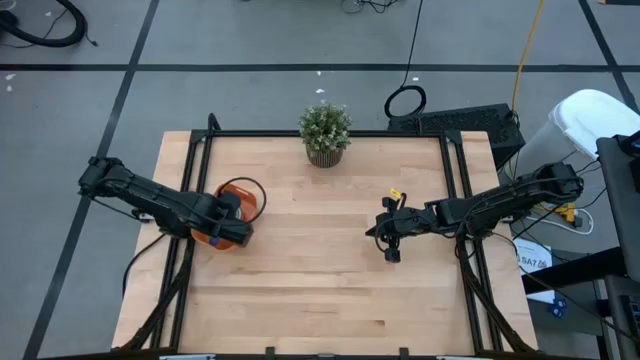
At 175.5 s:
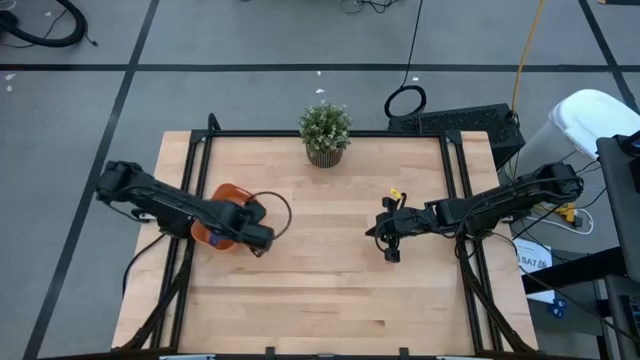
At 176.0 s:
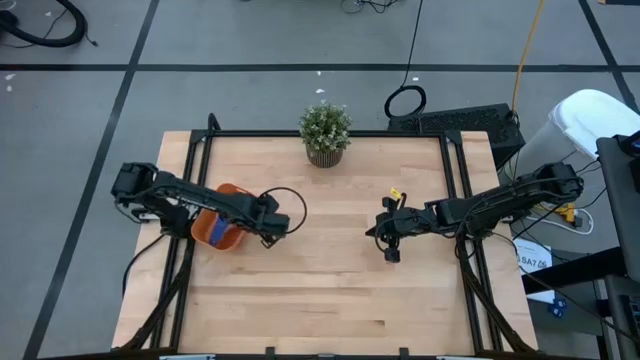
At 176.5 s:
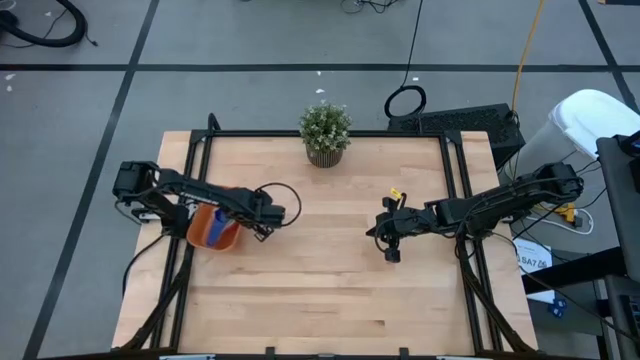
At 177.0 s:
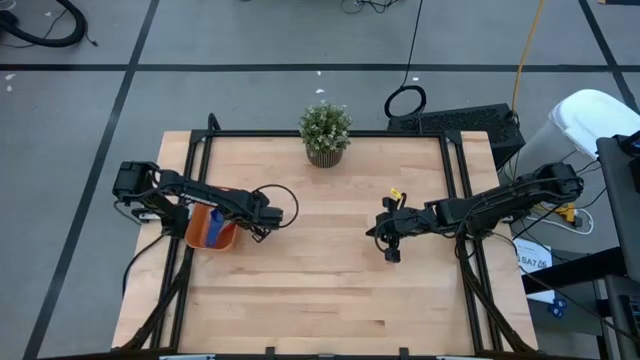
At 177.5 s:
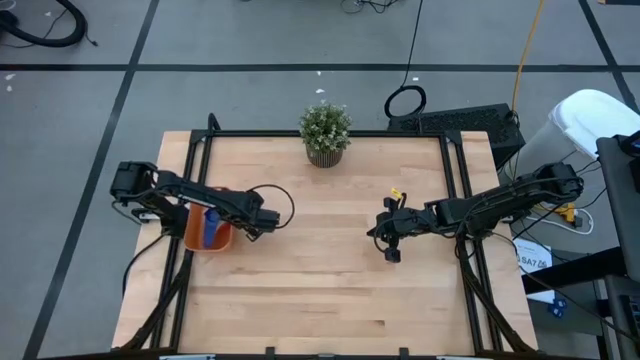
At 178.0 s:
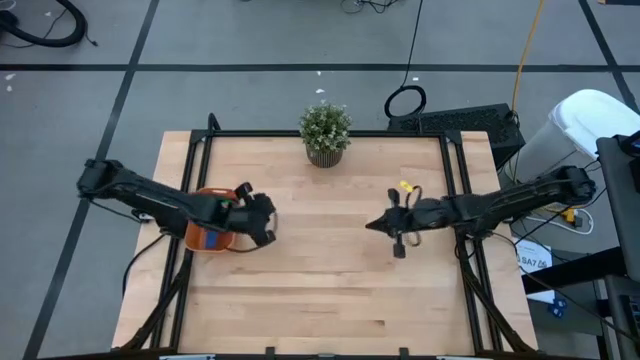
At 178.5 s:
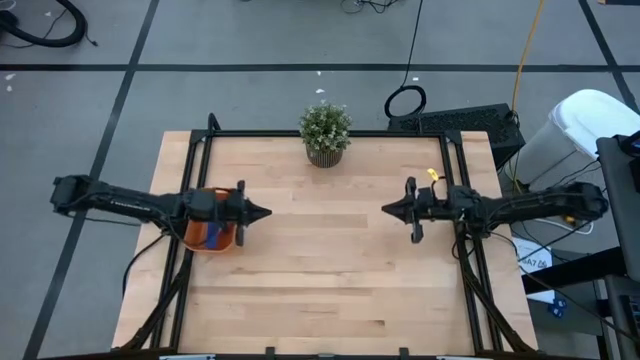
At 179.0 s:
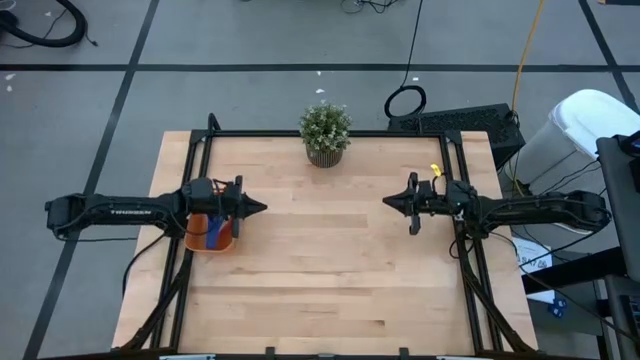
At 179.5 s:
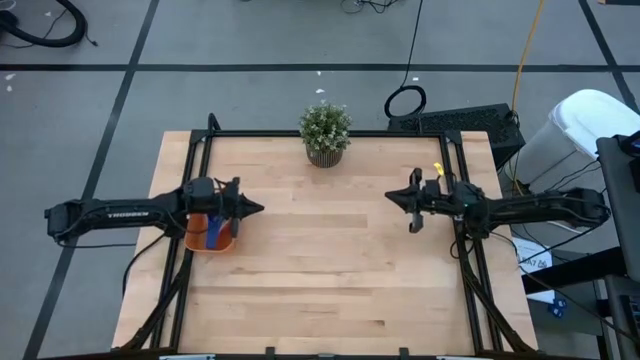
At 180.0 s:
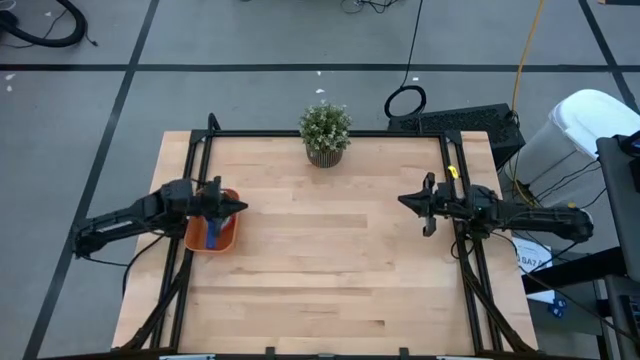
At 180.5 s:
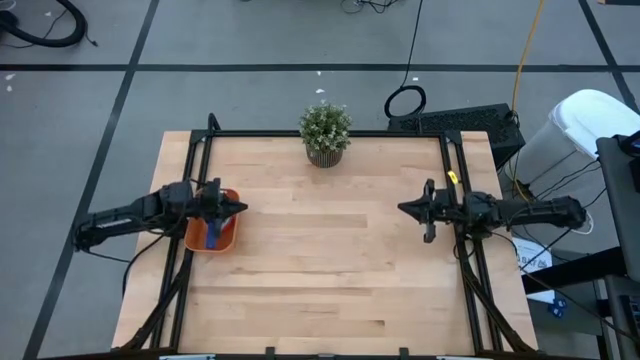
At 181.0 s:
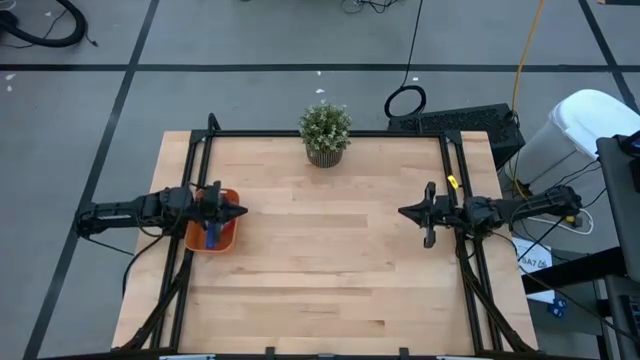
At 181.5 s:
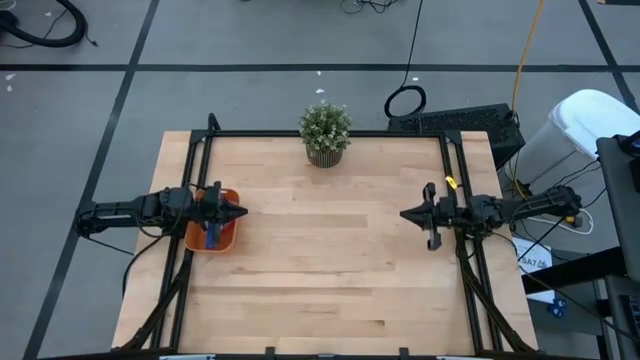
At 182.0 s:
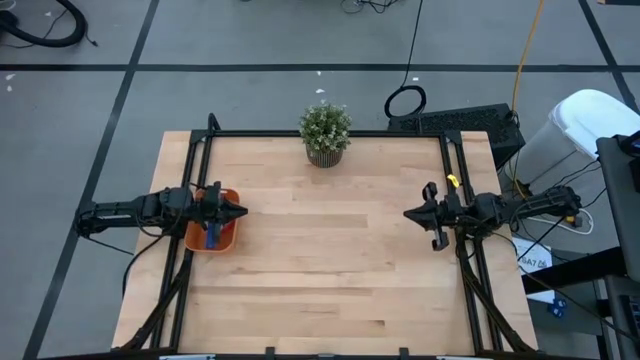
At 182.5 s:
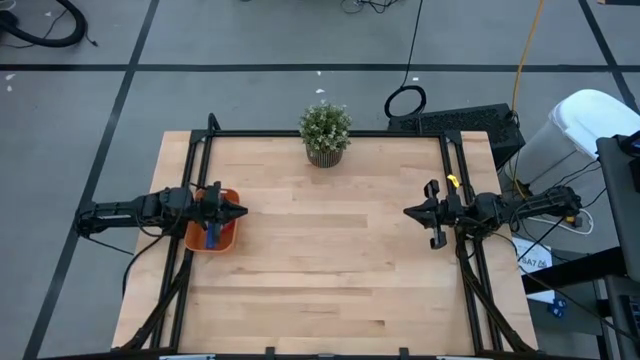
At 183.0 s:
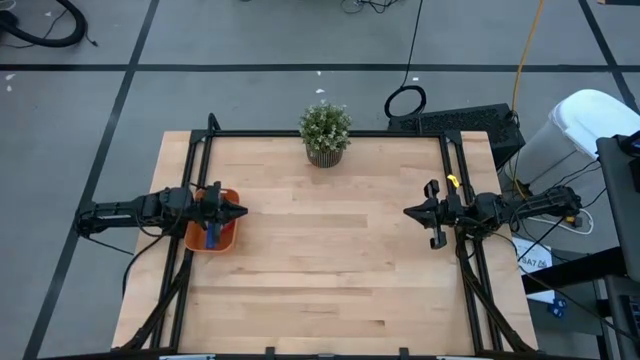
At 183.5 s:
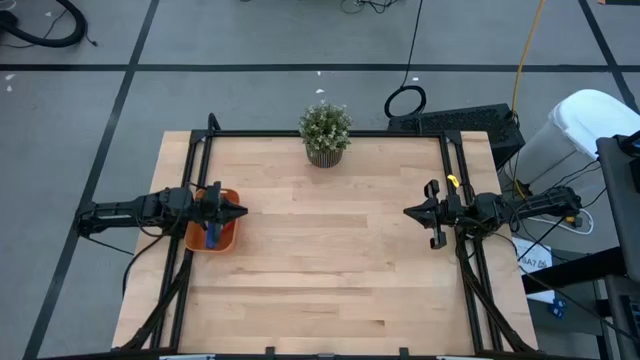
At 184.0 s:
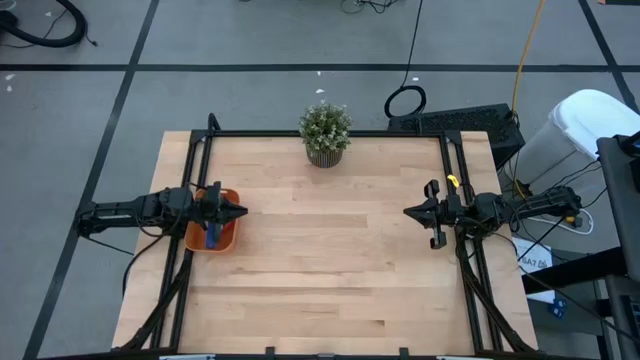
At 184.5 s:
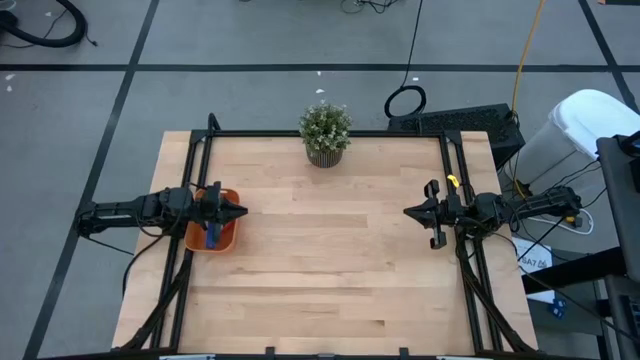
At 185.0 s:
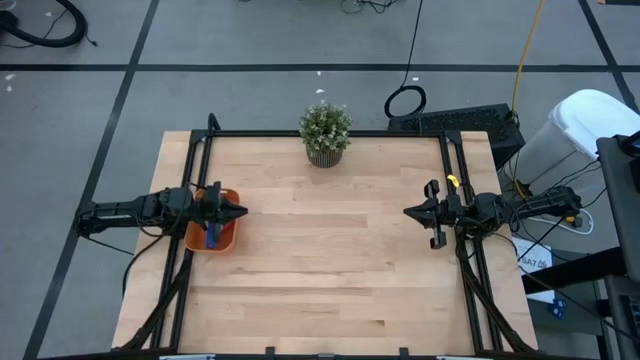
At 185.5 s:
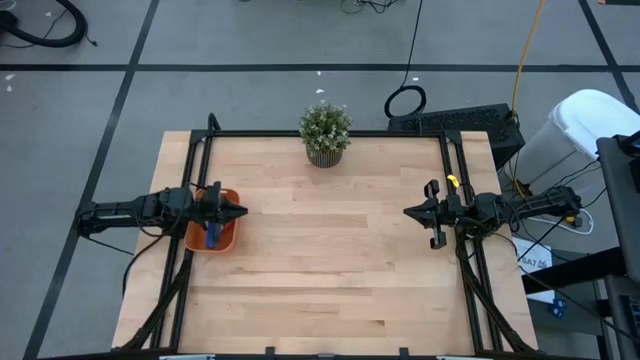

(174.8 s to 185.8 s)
Task: Nest measuring cups in basket
Return to Home Position

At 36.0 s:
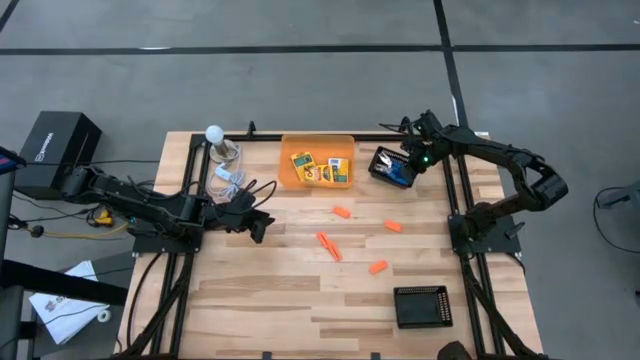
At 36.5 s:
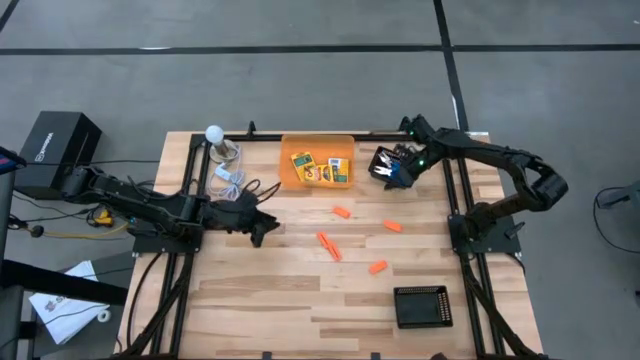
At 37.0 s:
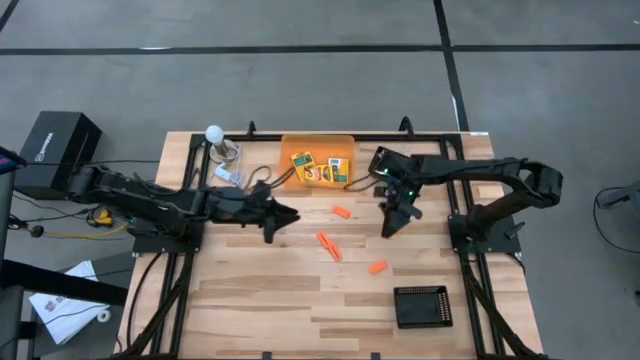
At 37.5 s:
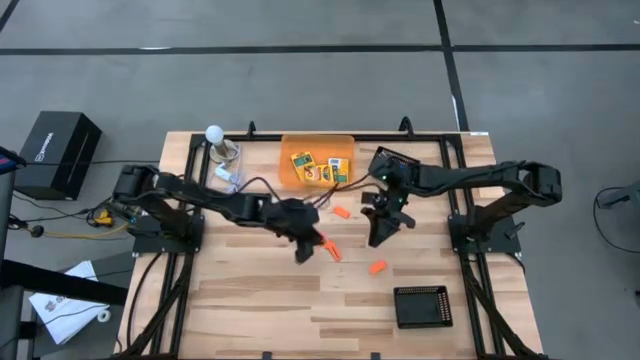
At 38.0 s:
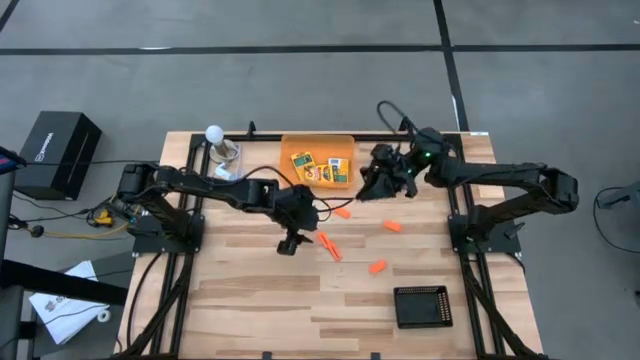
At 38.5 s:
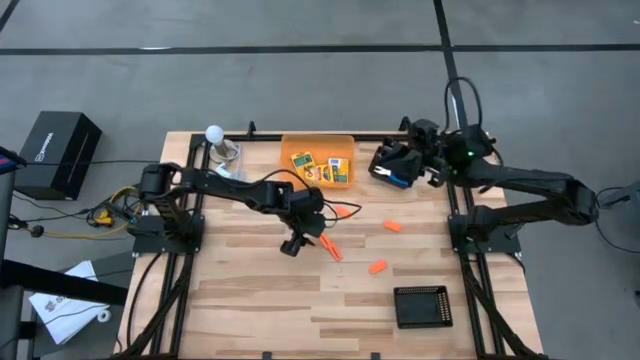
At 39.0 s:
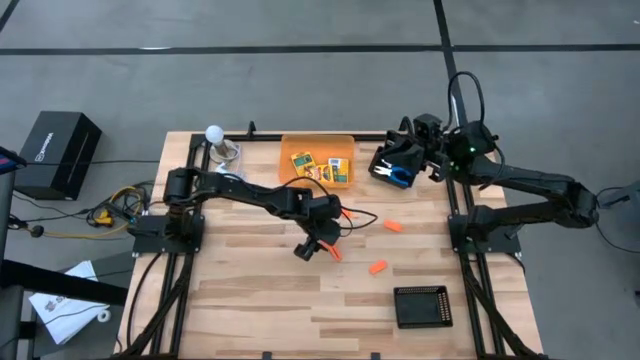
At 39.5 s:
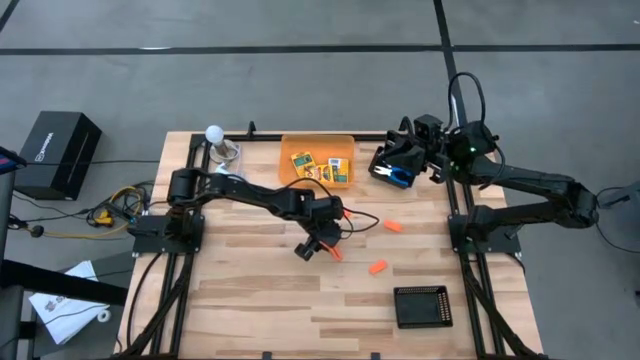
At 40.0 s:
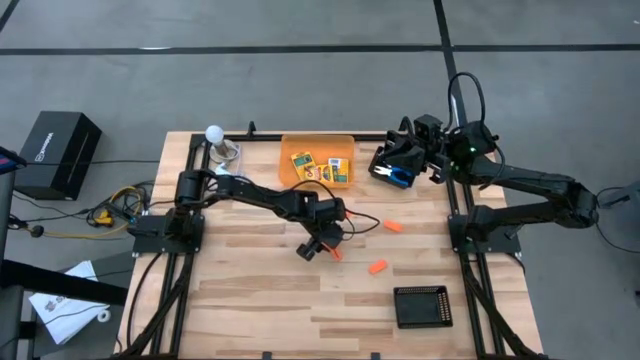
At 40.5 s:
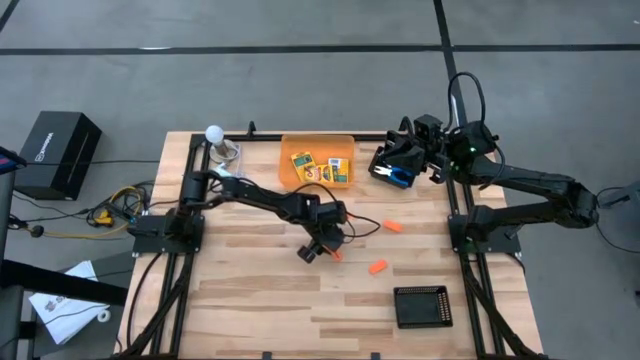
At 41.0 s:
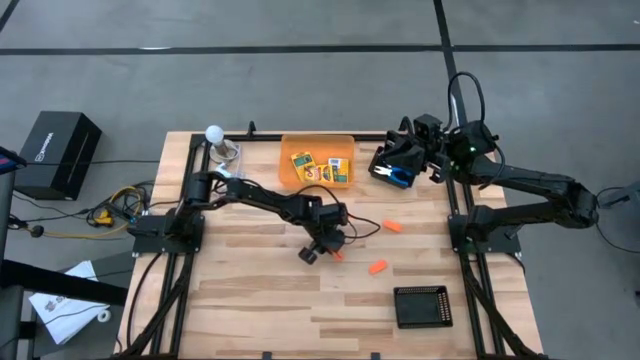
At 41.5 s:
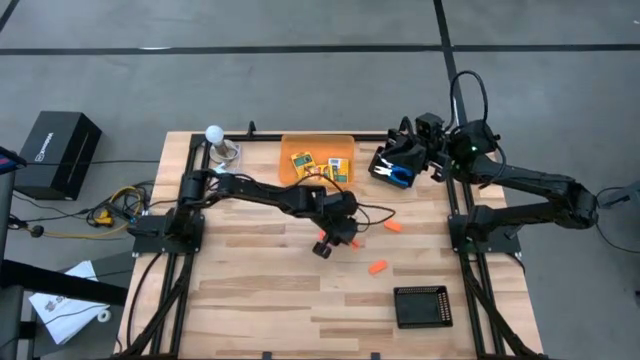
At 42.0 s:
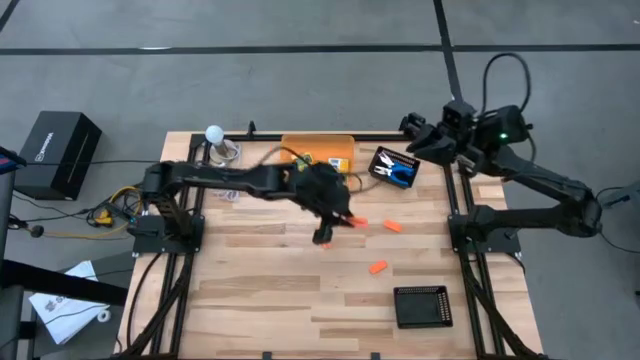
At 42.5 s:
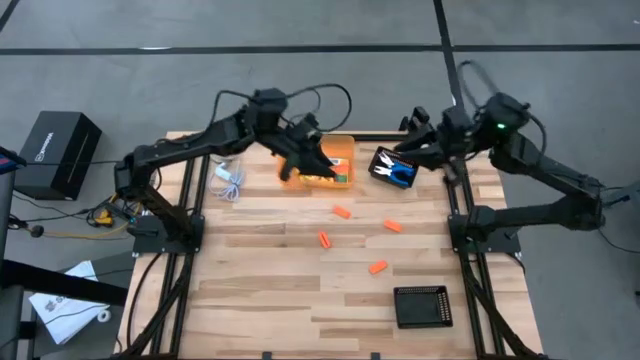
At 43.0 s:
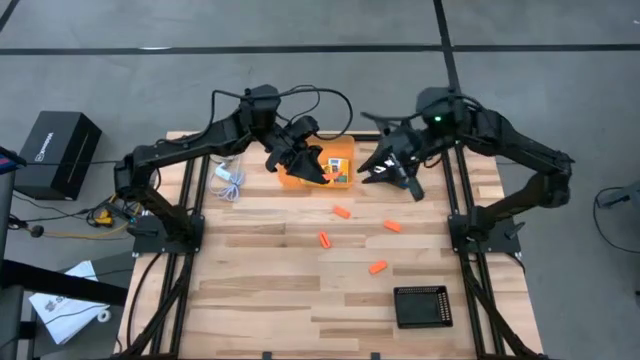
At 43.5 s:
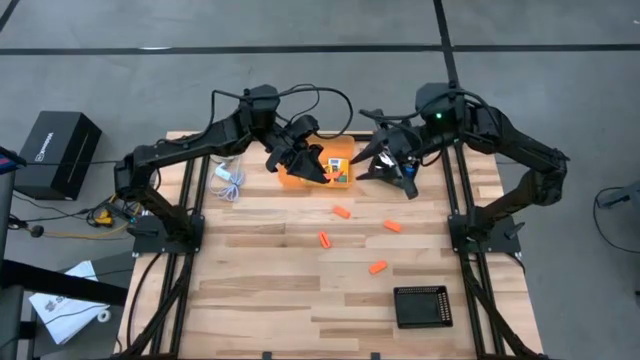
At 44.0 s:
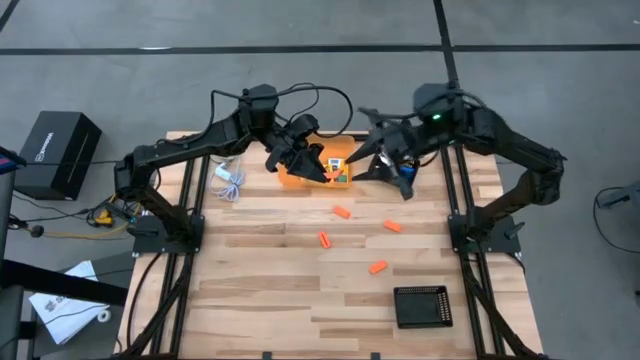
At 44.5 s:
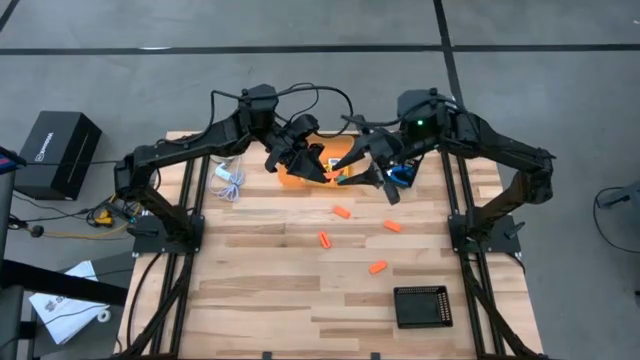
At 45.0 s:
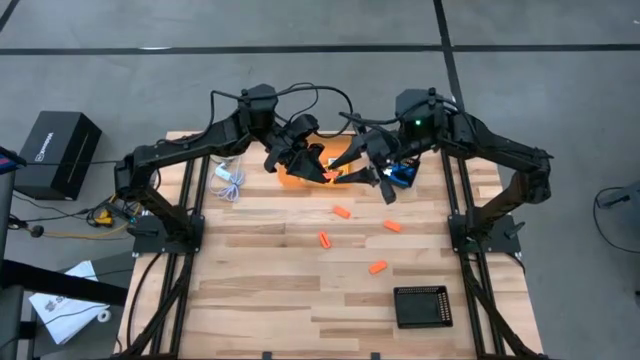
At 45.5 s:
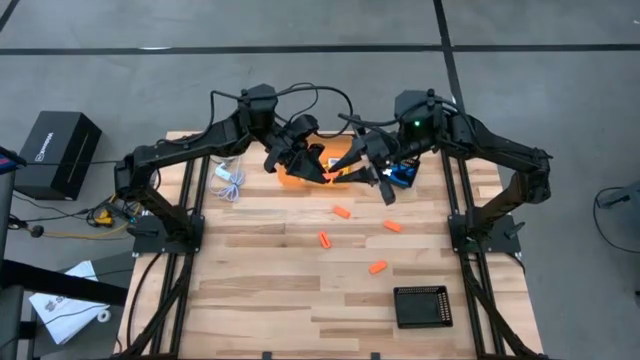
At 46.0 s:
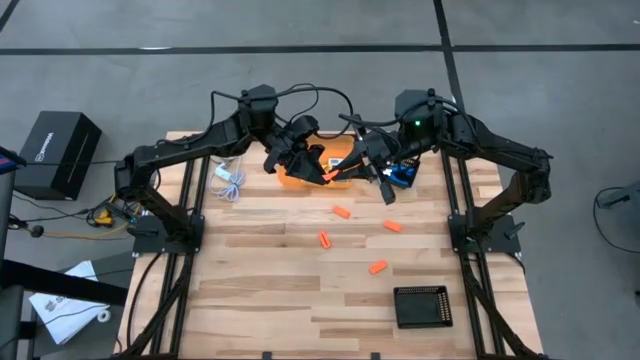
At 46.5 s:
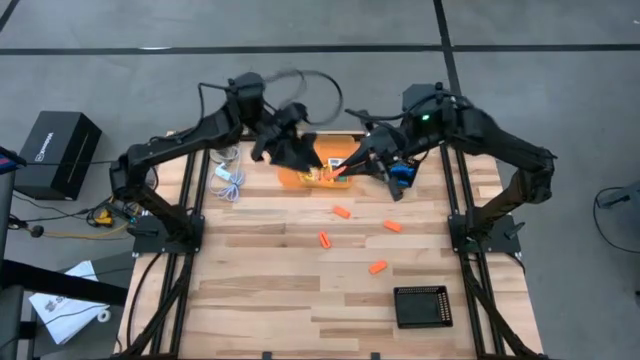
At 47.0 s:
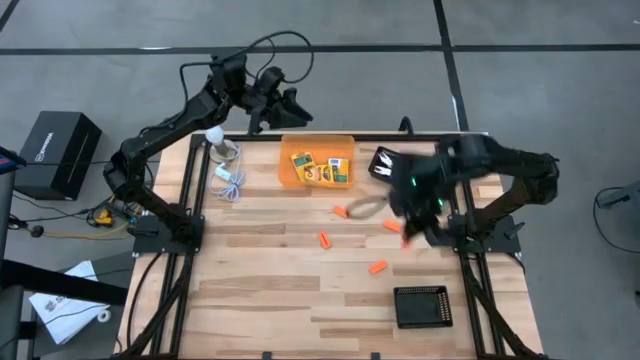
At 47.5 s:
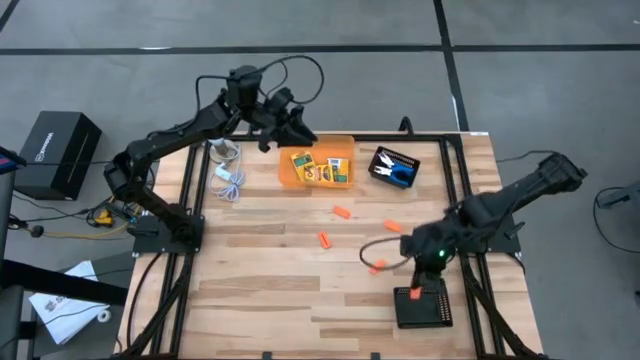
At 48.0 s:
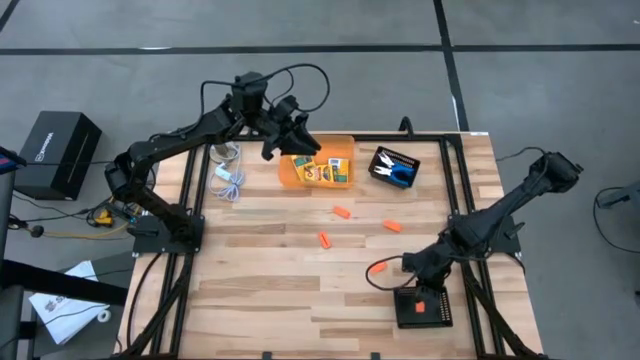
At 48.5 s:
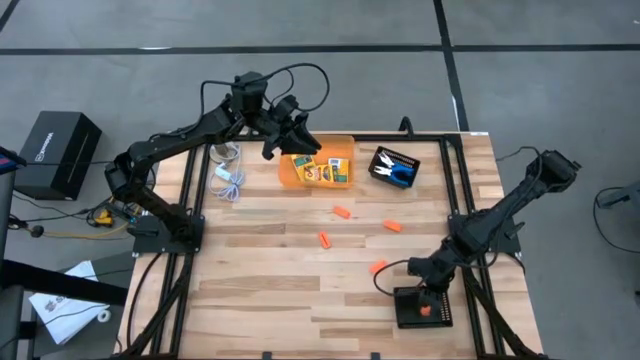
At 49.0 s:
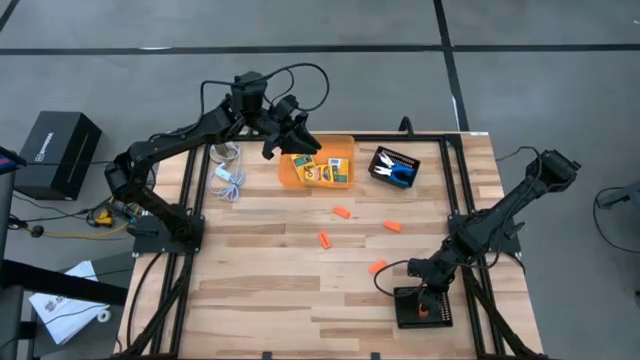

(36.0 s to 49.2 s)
Task: Pick & Place School Supplies
Put the orange eraser into the bottom black bin
